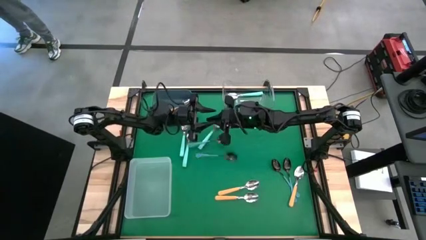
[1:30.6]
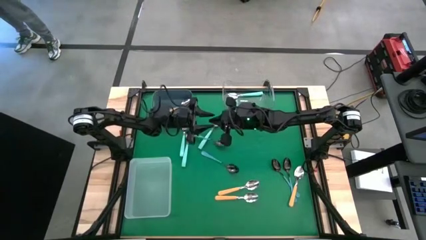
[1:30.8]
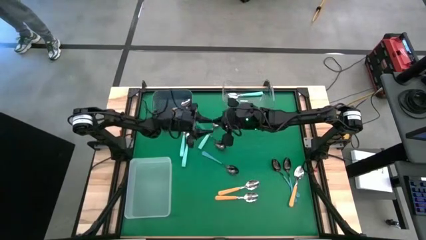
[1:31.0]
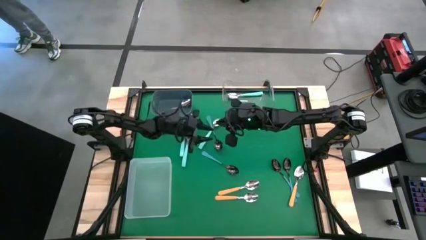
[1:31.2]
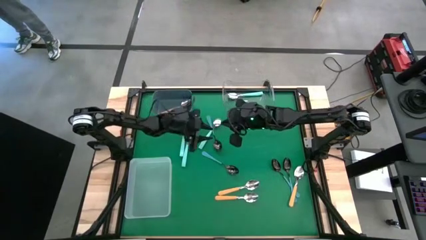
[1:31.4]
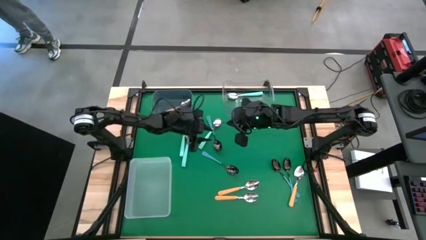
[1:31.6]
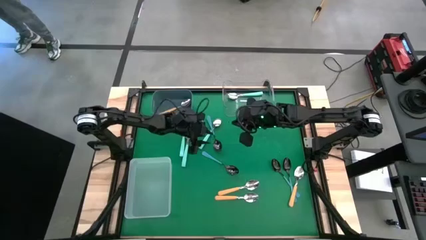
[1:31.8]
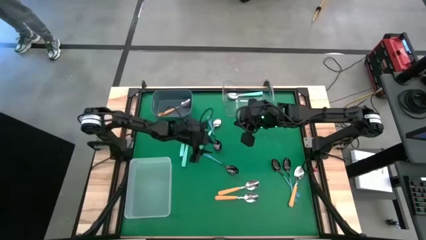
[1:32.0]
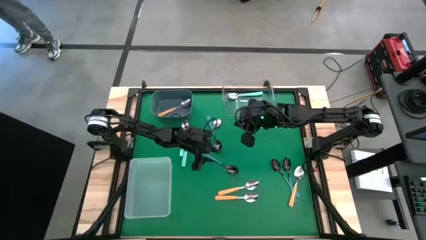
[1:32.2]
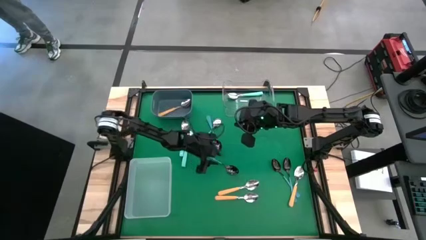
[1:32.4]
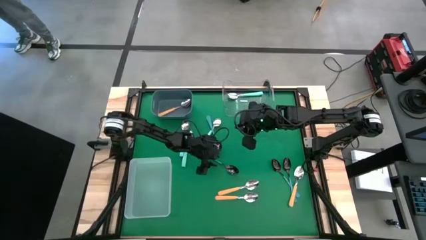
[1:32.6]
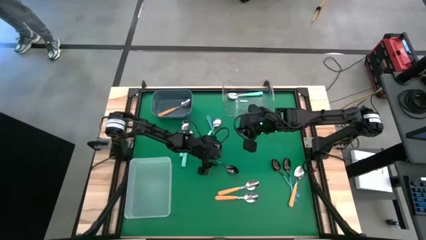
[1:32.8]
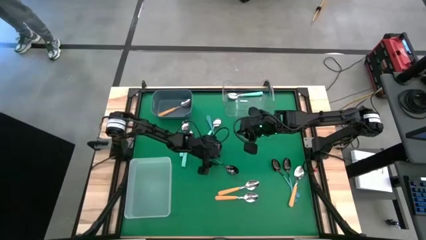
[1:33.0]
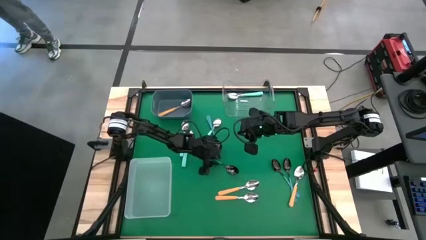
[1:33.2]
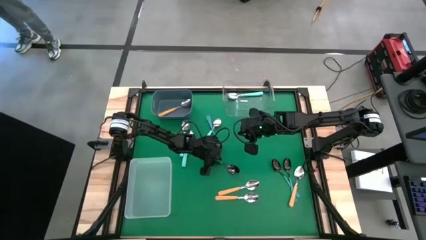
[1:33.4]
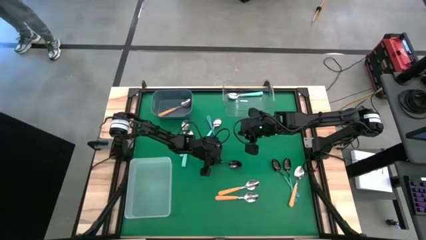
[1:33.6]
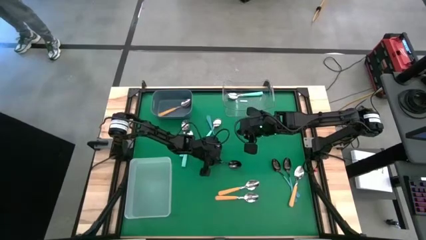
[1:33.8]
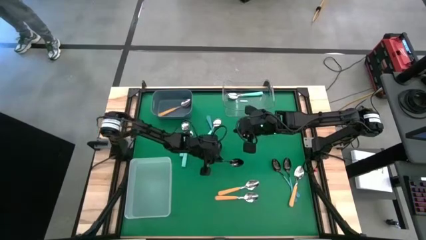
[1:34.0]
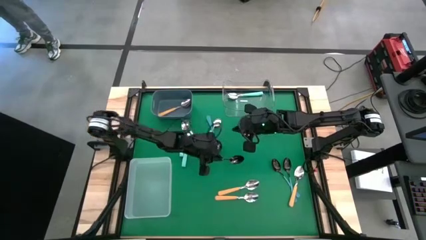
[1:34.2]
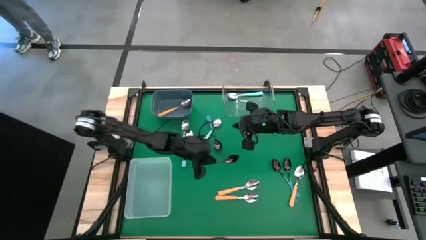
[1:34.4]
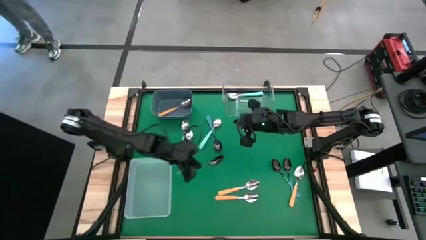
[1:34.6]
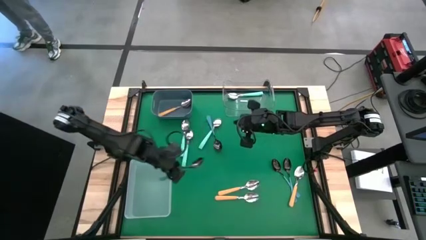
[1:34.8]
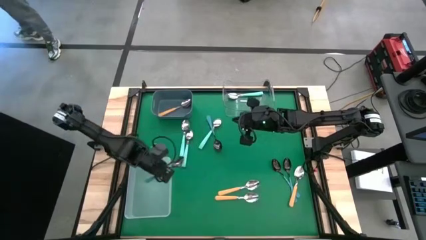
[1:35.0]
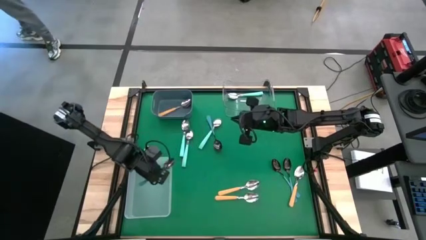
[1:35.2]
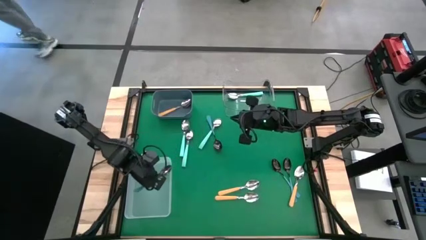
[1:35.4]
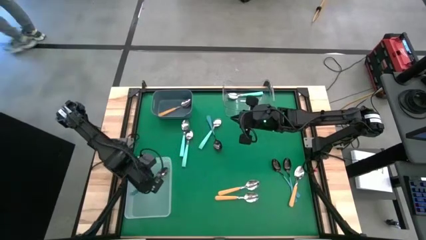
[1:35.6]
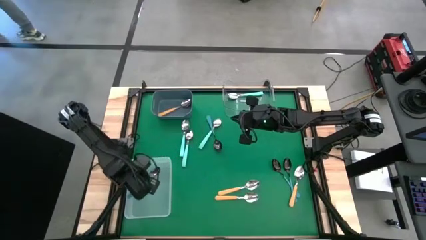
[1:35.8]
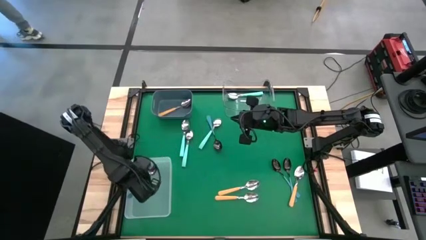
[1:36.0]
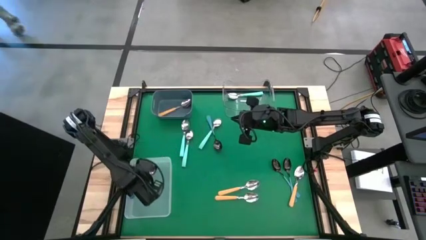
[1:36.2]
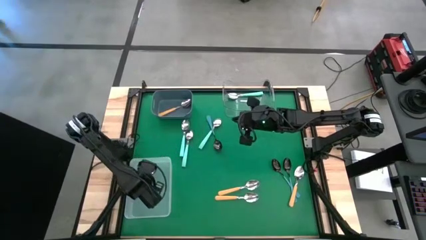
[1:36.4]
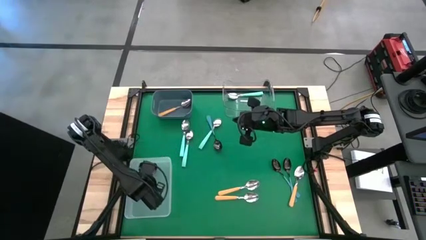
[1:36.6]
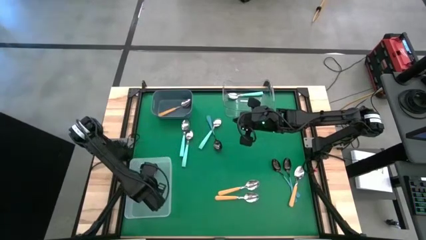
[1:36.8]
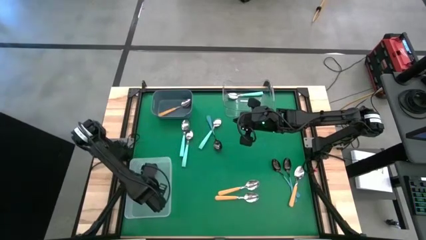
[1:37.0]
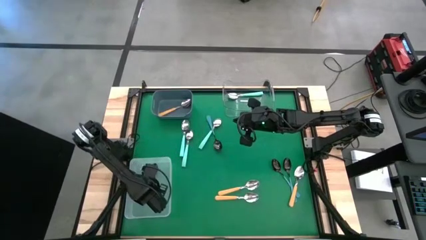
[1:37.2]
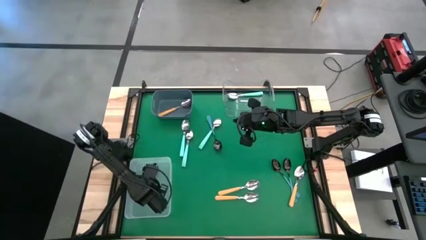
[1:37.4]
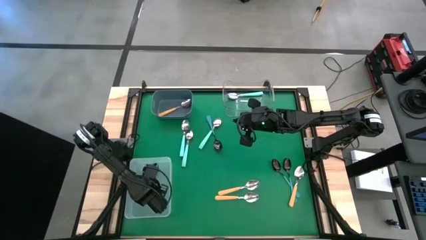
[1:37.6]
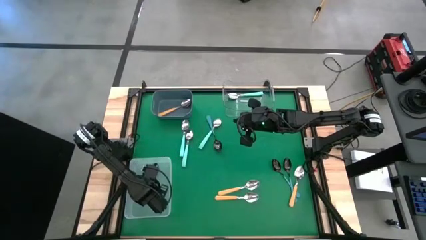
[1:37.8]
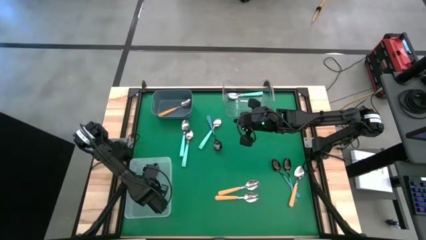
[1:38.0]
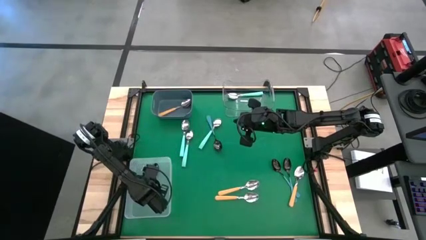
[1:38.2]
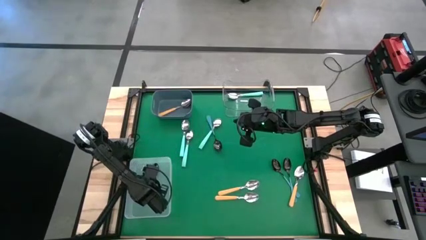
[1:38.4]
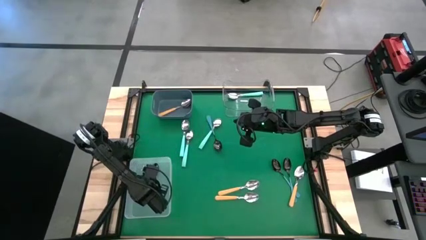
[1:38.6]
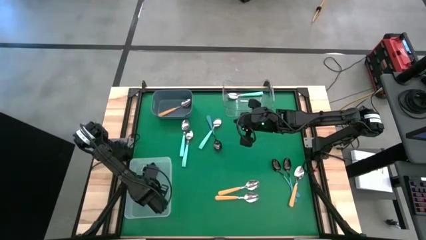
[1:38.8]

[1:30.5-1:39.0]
Task: Sort silverware by color (type)
Put the dark blue spoon into the white bin

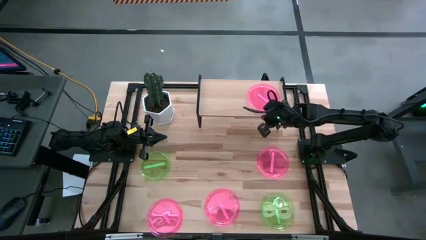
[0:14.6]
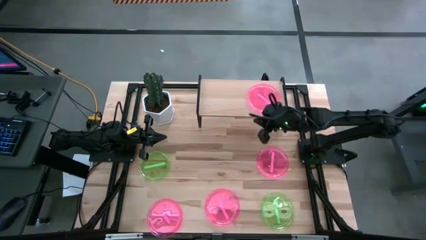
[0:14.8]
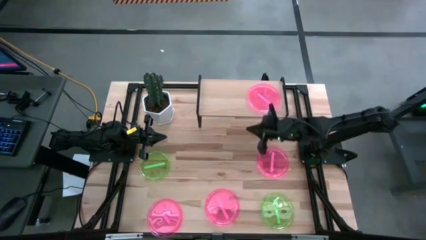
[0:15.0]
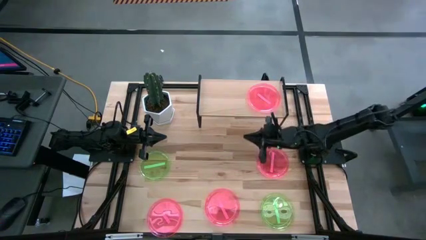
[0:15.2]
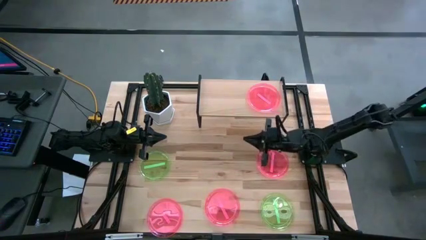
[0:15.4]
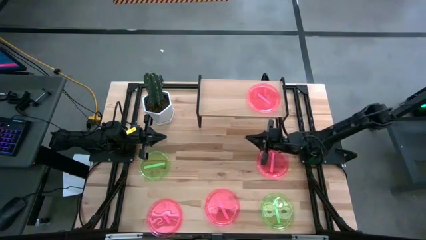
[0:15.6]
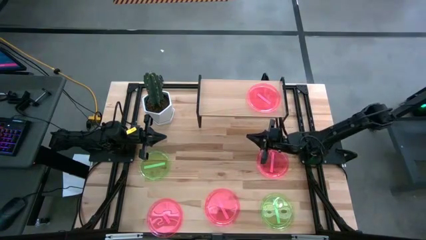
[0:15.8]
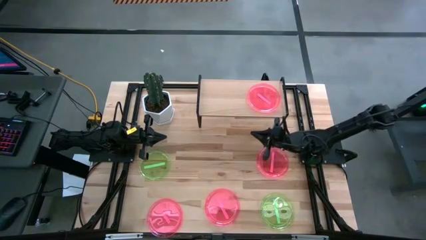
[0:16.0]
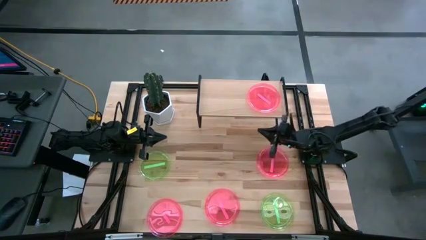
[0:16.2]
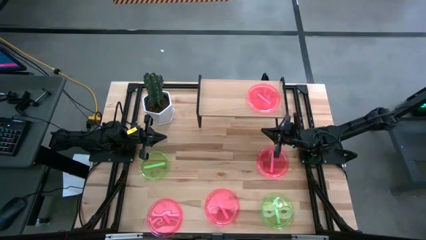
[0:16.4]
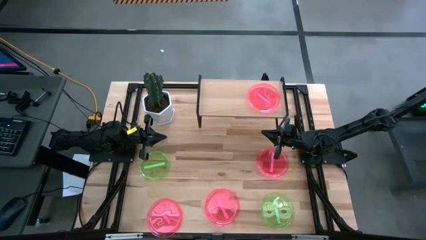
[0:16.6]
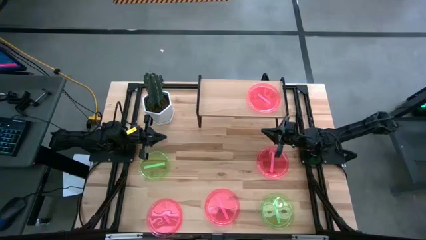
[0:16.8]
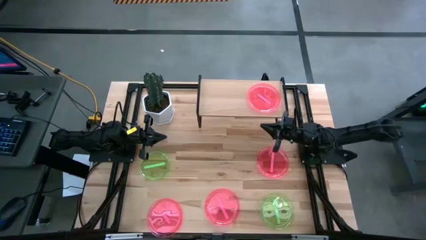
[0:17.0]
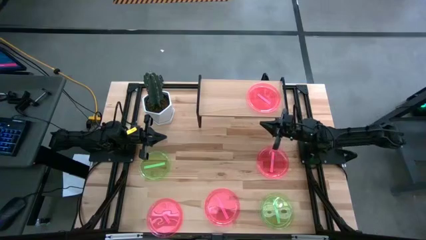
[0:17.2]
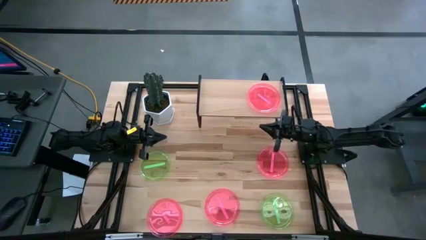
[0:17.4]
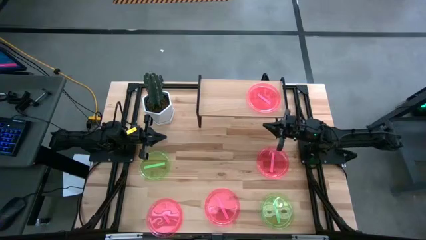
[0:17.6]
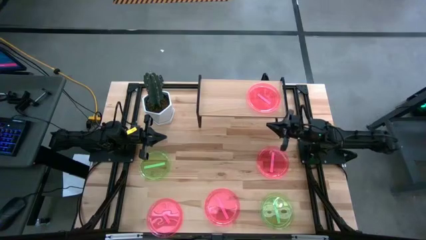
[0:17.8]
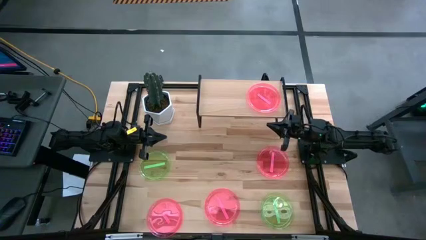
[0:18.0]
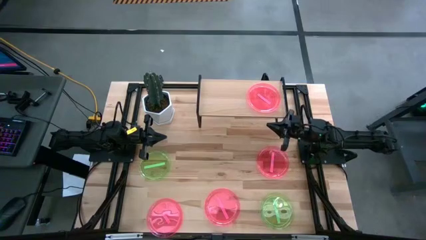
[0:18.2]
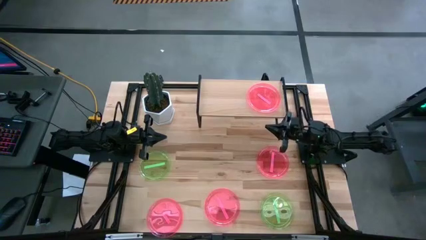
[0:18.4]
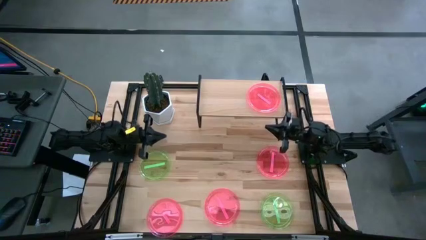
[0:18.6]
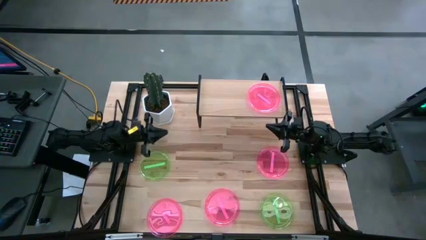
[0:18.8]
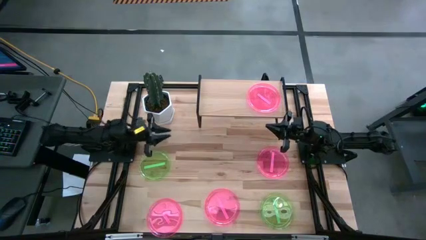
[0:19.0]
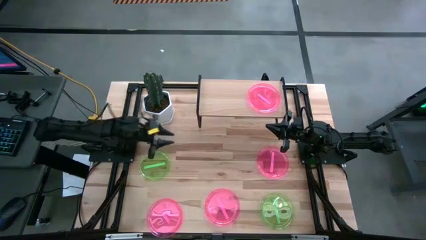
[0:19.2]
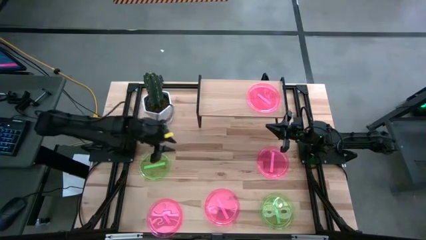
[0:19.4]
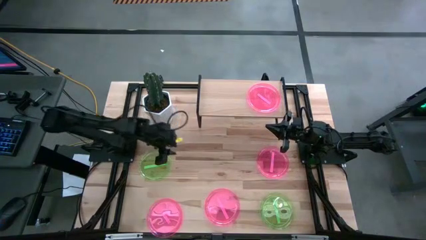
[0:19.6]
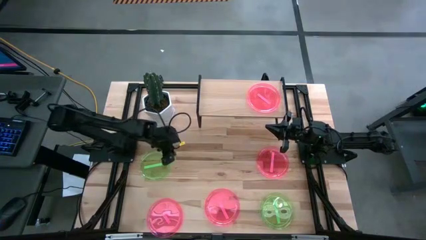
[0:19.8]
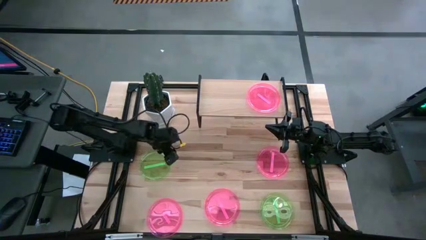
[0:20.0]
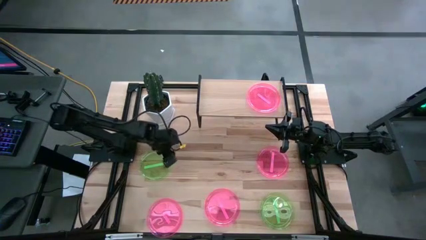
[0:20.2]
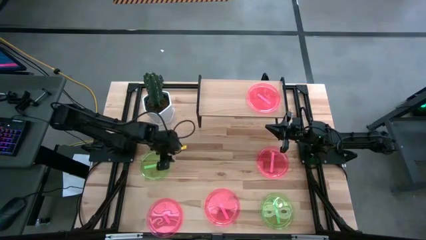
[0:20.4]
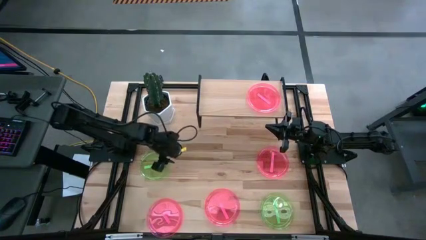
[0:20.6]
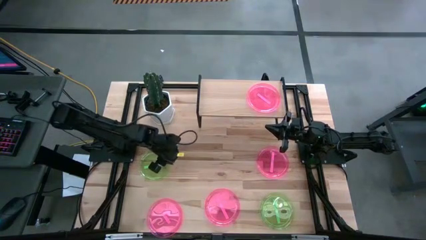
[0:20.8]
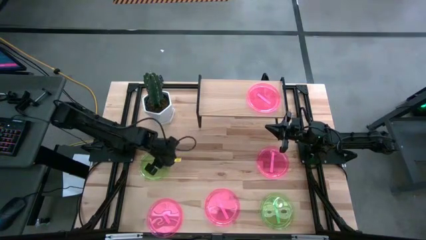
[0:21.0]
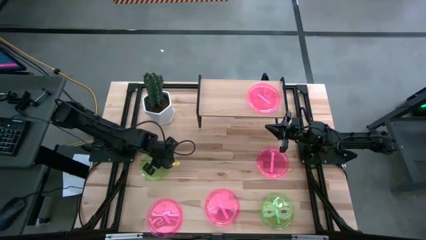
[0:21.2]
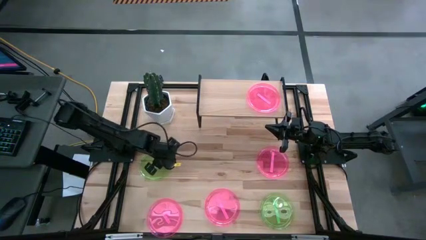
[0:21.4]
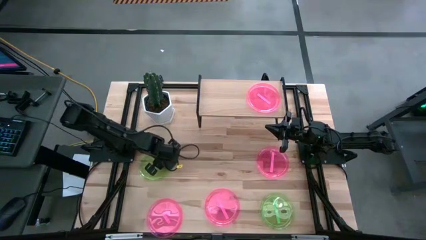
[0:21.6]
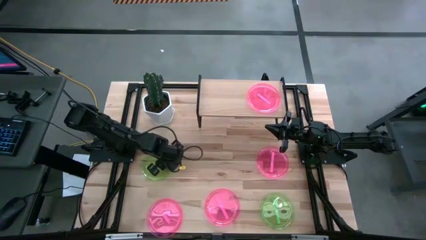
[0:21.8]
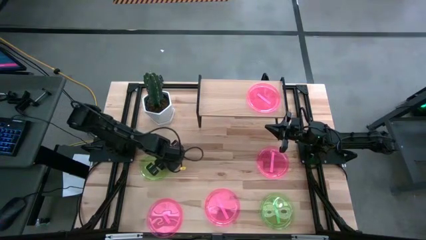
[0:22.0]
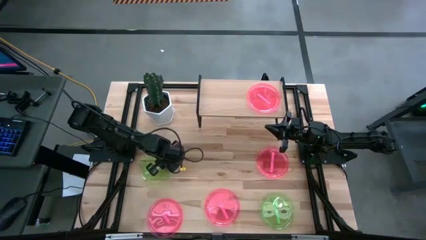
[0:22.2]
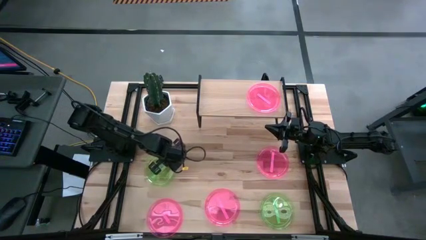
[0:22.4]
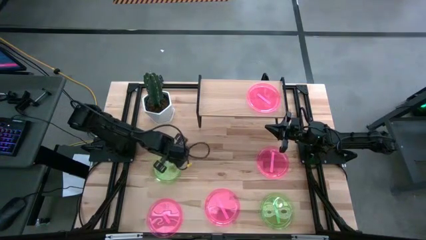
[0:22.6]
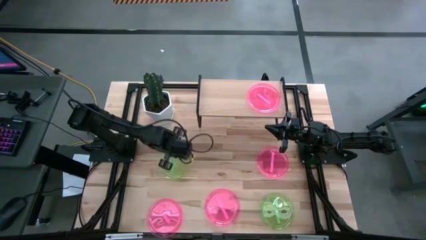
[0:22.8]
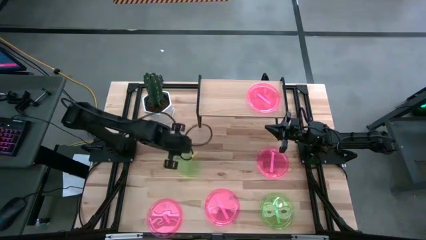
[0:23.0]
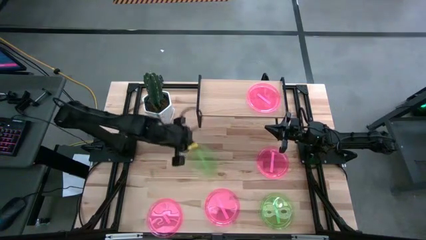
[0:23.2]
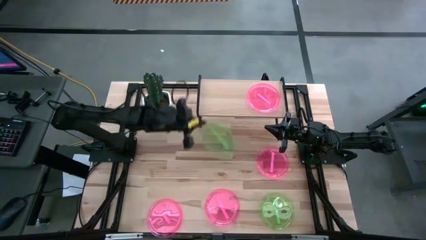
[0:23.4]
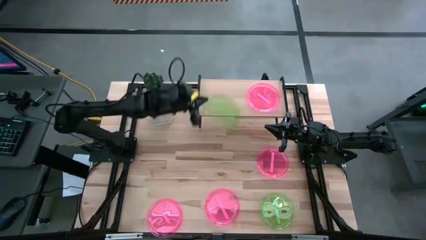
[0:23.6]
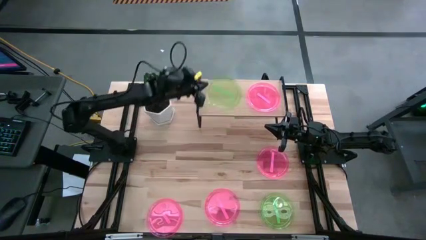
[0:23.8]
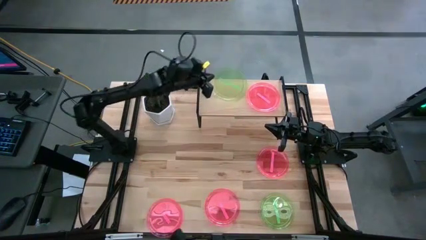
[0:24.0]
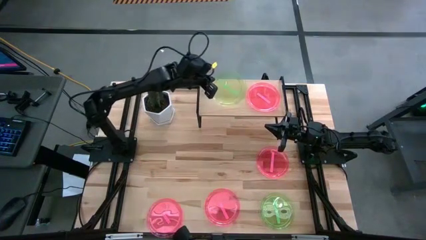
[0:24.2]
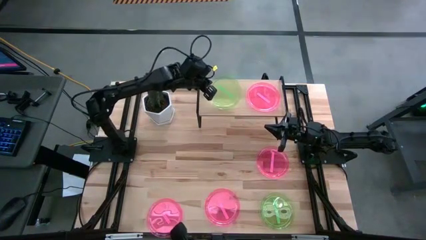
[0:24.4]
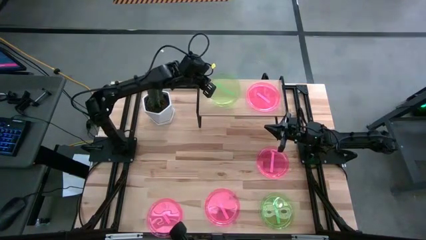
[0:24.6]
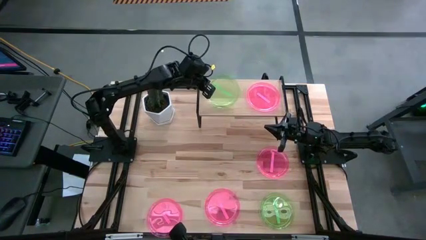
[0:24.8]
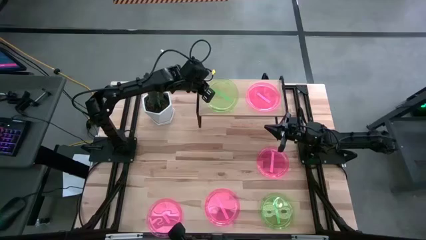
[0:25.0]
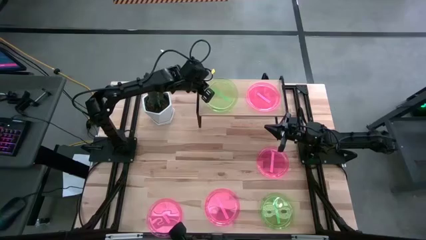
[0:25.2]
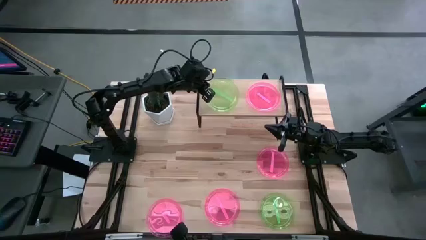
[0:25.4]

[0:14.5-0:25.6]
Task: Place and stack plates onto a shelf
Put the green plate on the shelf
